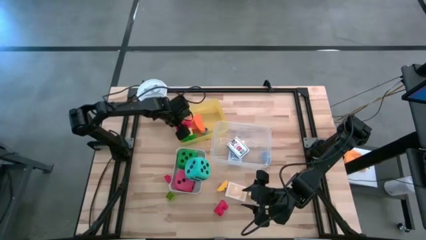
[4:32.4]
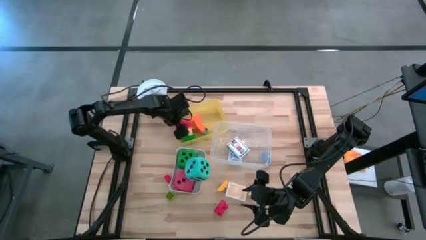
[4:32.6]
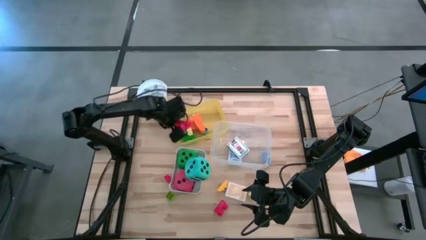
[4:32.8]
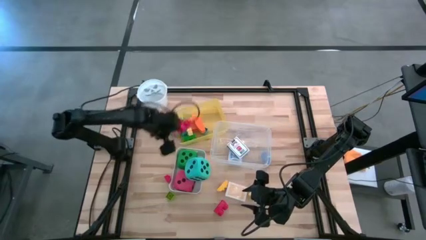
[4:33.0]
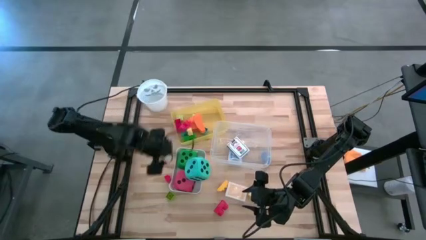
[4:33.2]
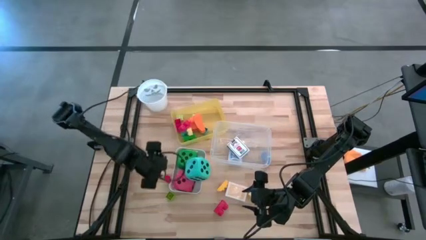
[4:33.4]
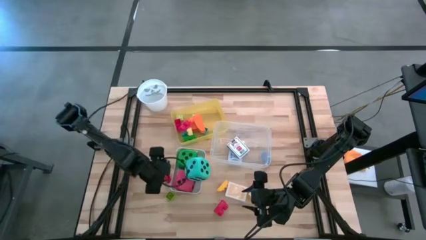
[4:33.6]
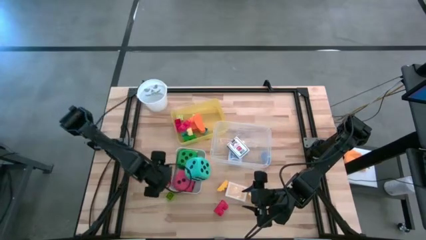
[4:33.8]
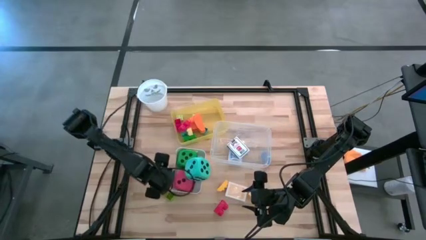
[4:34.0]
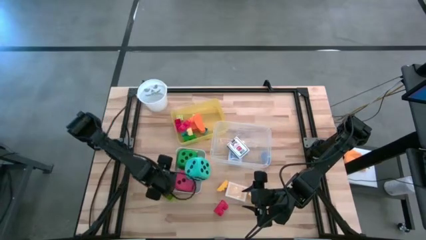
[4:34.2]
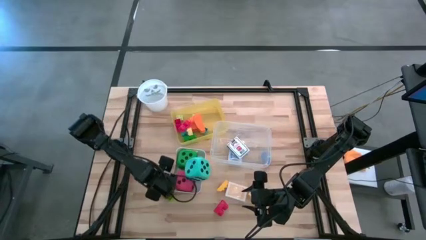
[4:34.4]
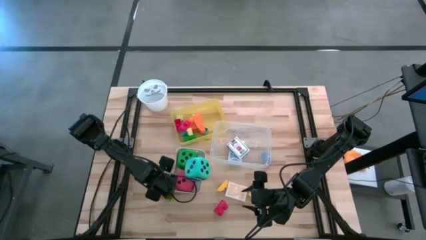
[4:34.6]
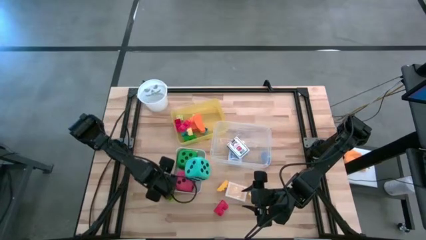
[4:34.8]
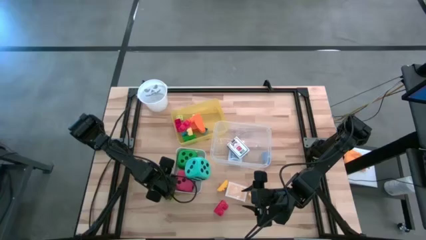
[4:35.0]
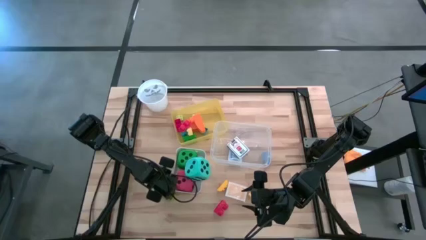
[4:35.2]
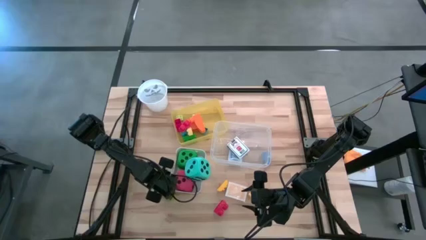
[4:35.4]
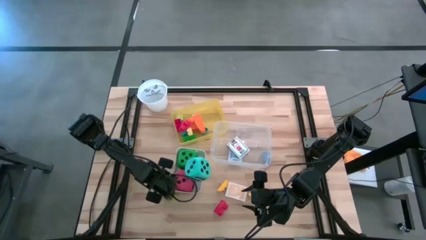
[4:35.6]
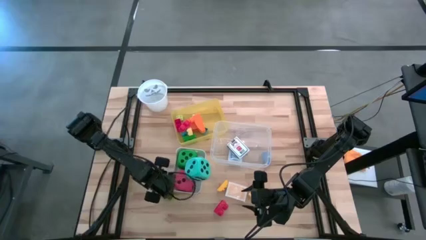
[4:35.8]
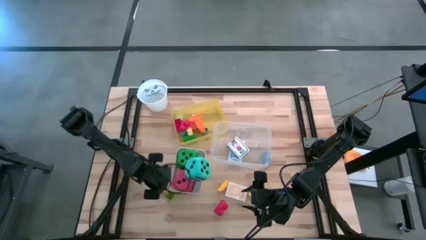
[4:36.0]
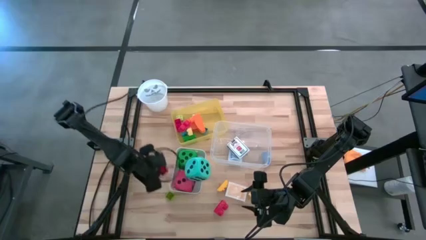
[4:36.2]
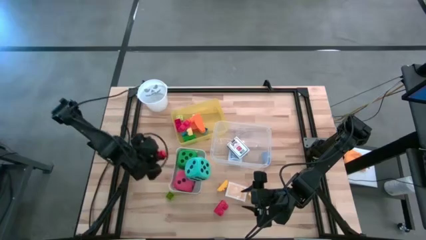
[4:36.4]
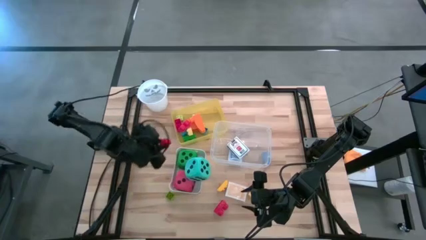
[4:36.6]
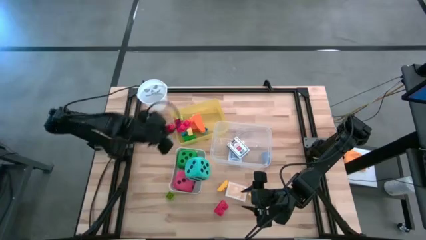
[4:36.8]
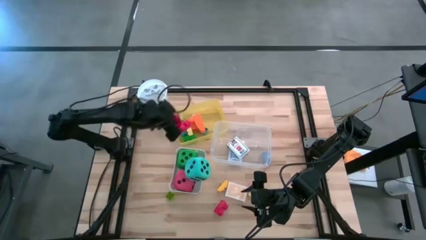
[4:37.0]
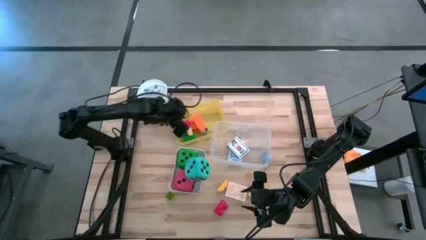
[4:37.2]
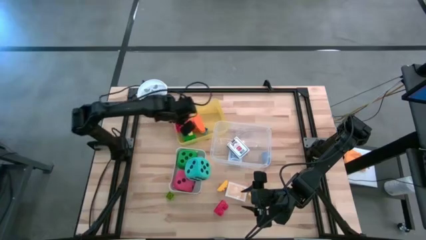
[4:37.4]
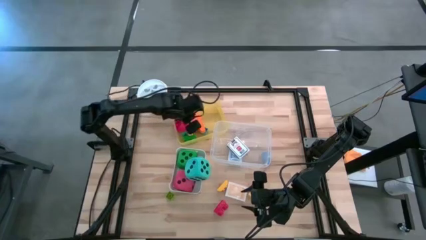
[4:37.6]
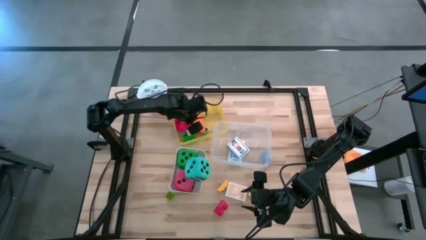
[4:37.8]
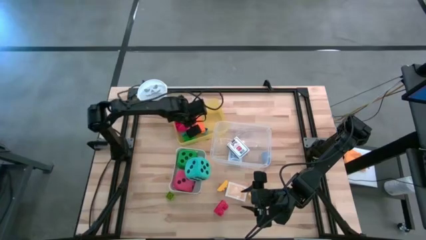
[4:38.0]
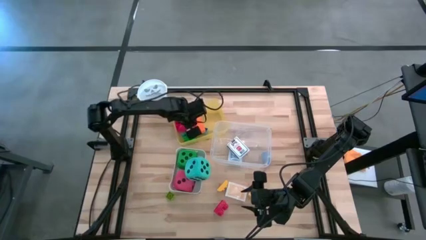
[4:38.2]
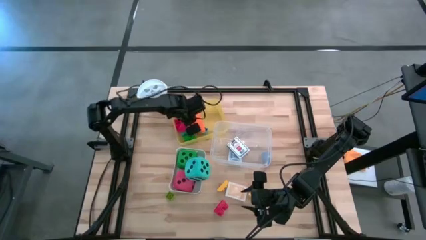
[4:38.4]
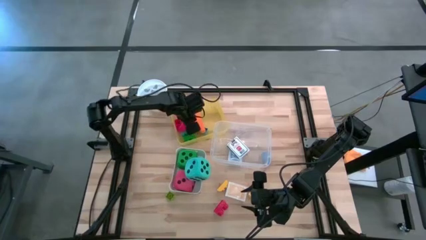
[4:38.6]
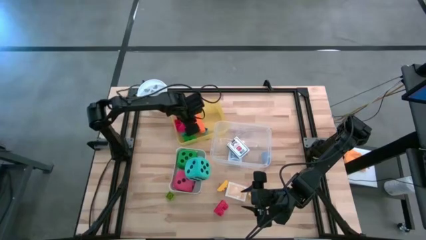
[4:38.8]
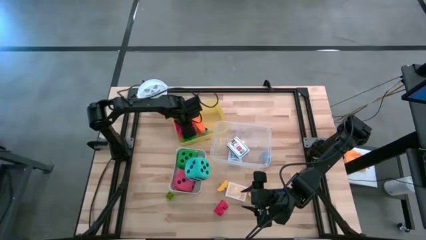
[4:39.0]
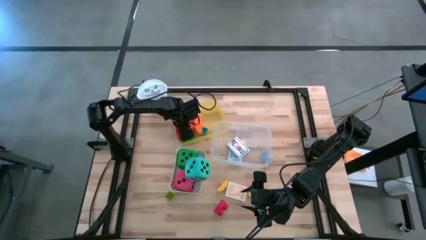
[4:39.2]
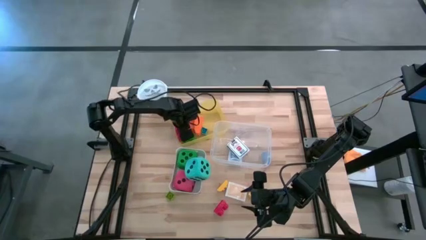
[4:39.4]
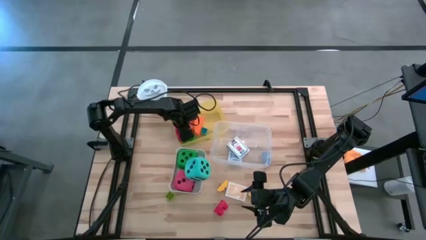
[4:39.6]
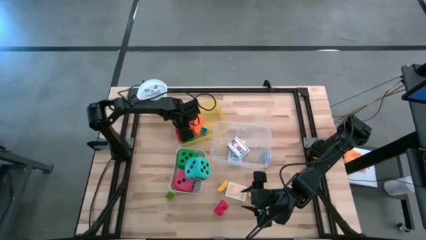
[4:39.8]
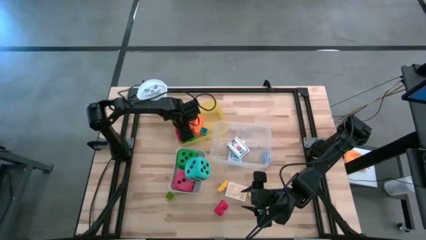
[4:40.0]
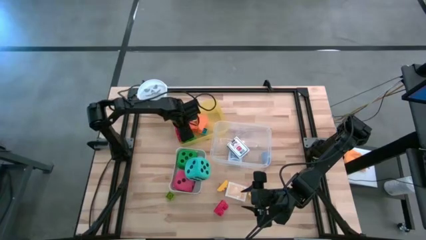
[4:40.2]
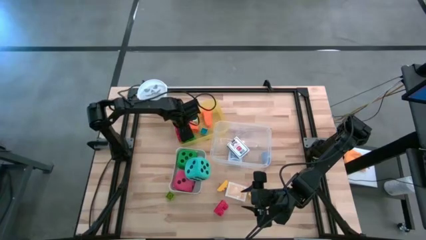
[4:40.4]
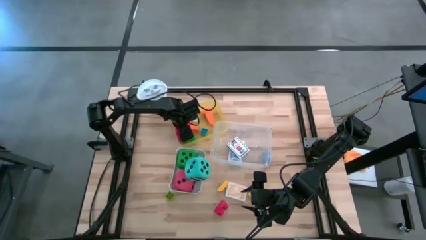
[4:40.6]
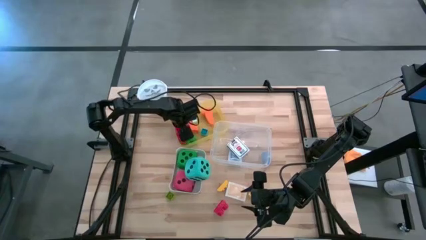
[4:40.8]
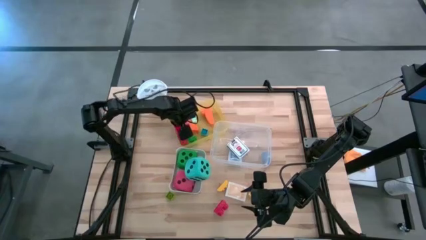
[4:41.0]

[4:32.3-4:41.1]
Task: Pick & Place Toys
Put the red game piece into the yellow bin

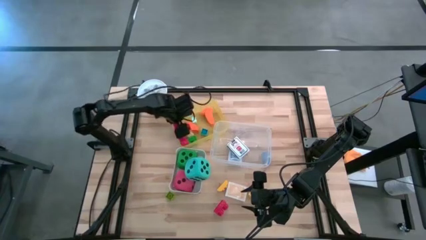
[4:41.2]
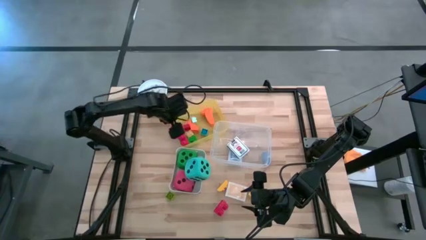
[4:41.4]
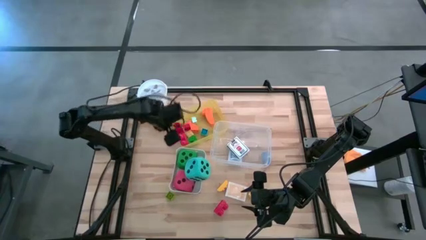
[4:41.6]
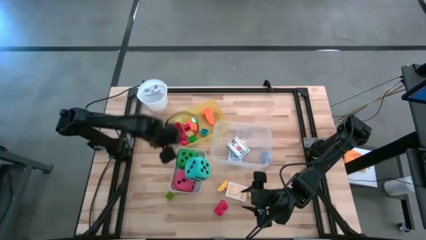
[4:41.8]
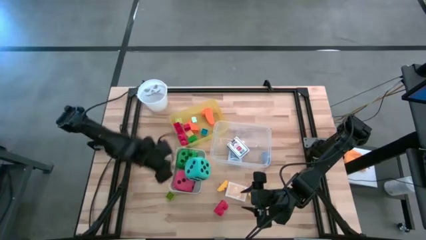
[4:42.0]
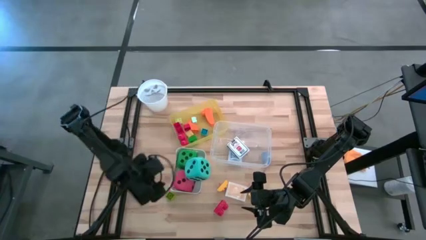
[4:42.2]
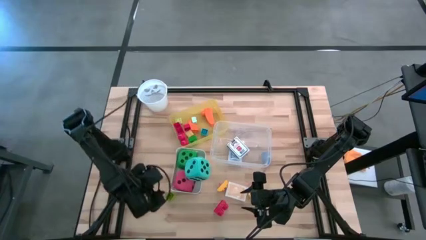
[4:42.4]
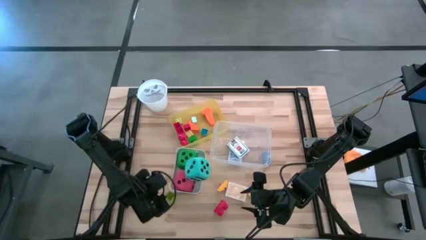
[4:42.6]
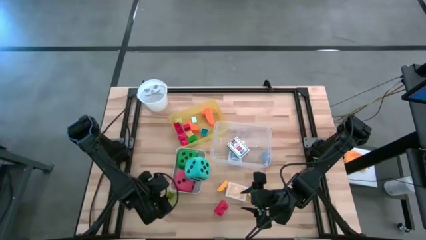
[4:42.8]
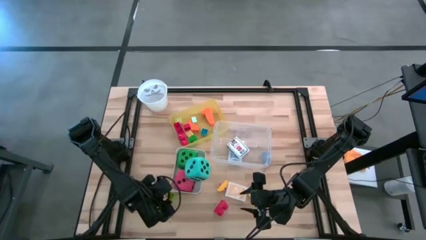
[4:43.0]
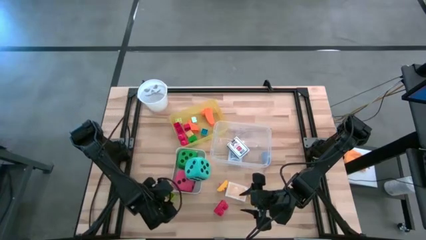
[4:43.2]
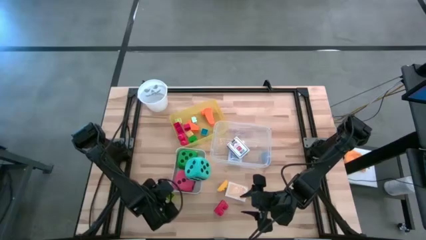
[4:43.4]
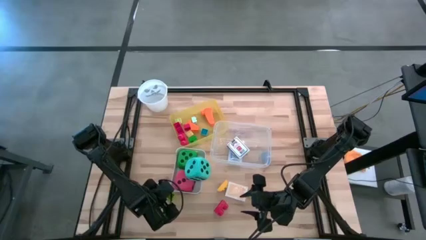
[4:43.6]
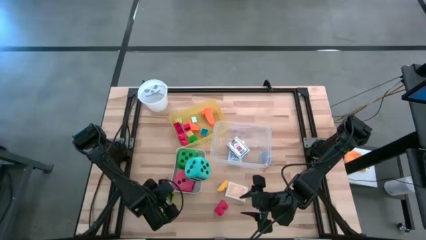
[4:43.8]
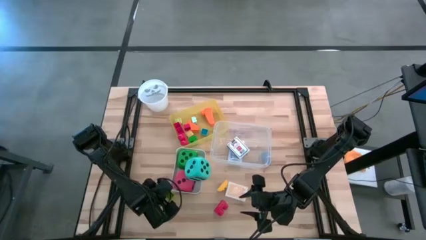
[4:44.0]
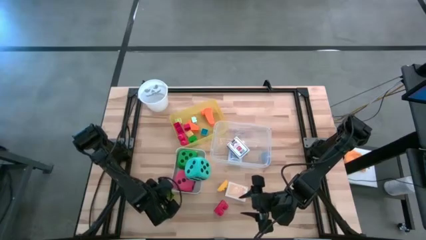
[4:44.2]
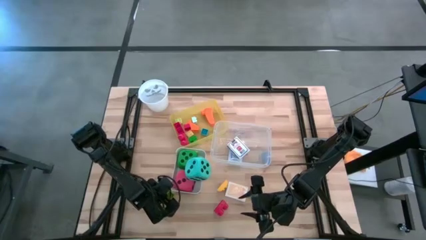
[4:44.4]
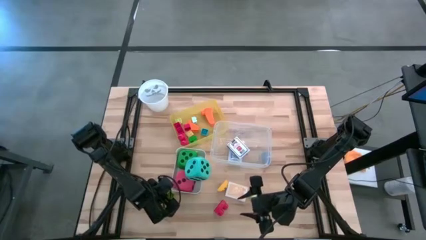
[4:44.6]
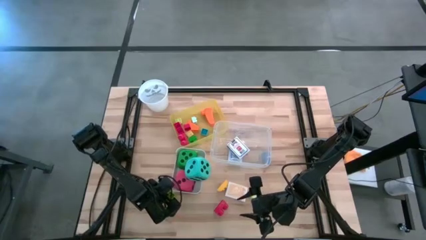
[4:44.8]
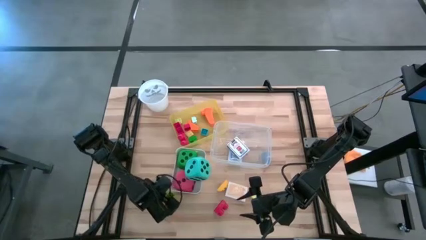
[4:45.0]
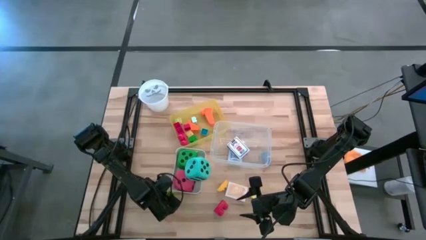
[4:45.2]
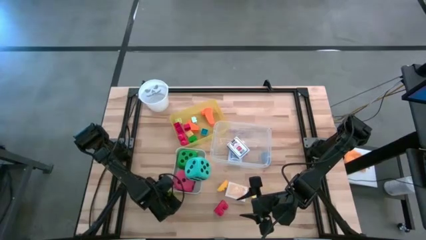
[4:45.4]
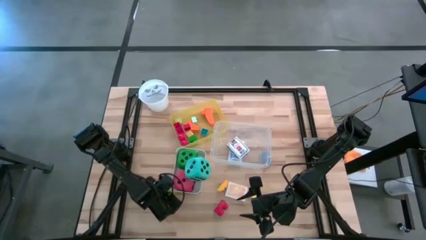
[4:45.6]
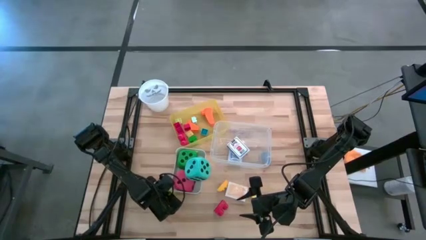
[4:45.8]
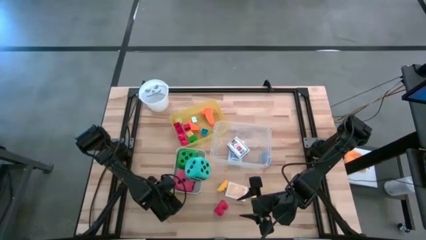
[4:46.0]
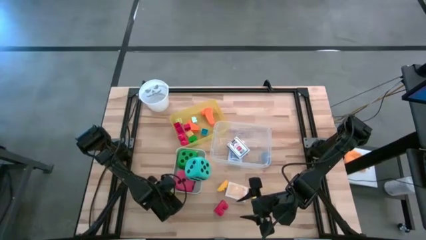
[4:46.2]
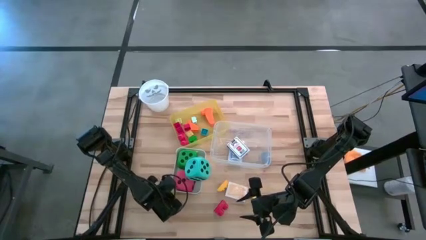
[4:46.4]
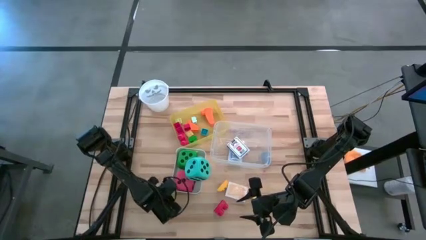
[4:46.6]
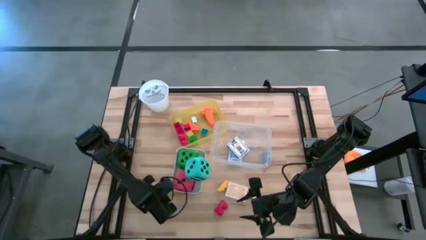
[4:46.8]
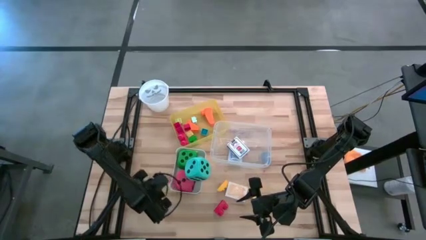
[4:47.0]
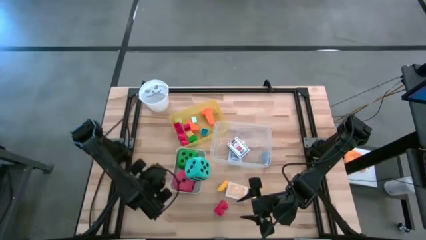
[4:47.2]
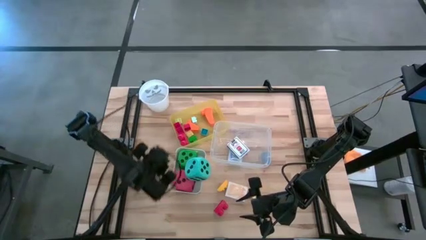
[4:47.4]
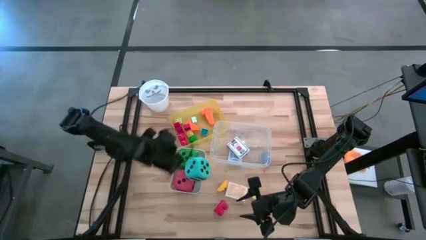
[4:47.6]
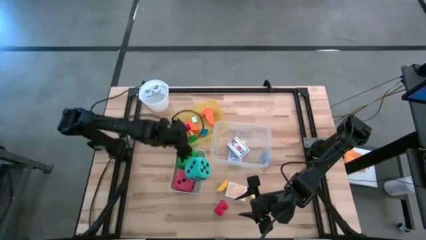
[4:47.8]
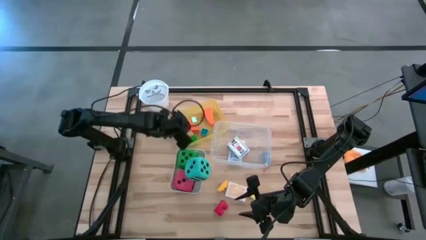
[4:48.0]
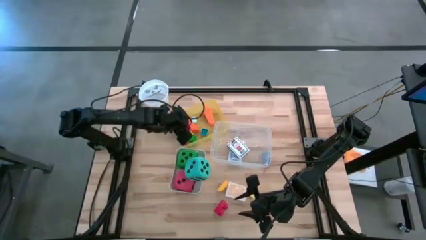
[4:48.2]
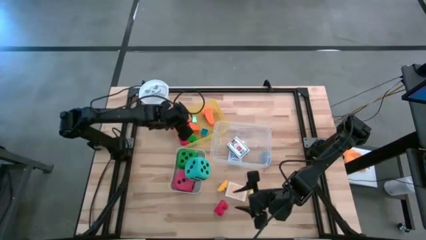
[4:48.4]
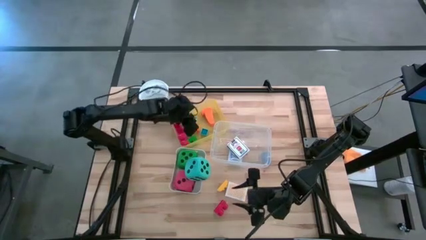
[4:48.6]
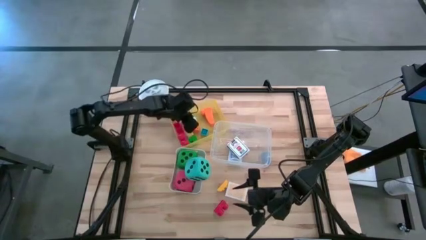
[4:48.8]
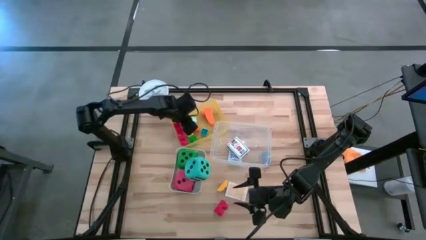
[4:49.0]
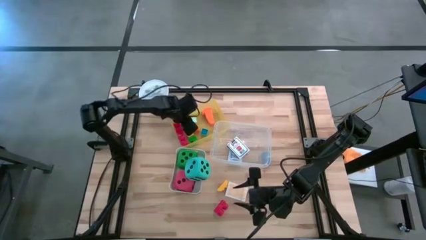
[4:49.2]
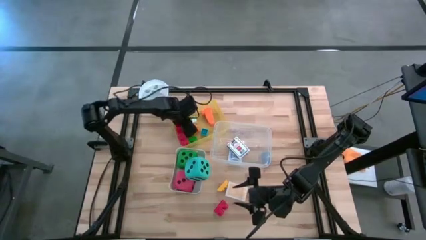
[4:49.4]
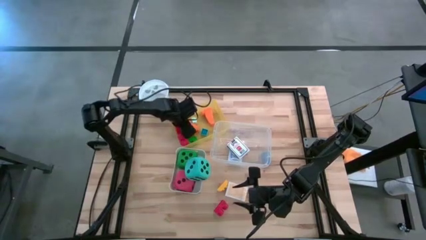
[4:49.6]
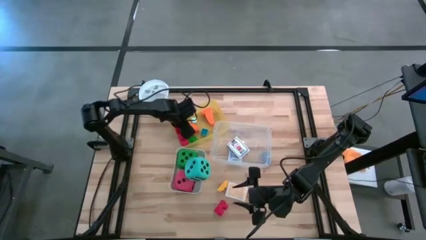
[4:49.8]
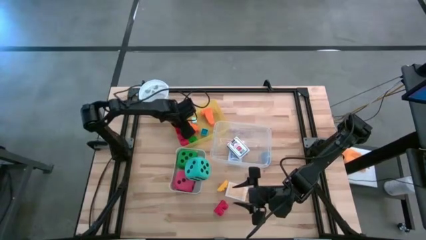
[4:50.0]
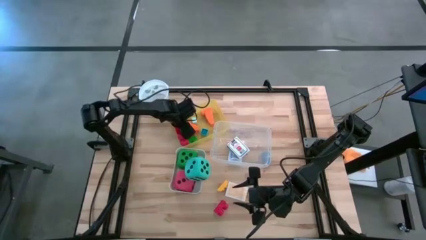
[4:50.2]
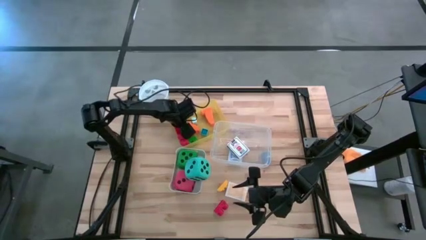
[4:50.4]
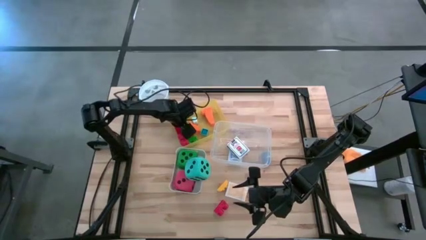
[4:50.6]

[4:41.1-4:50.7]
Put the green game piece into the yellow bin
